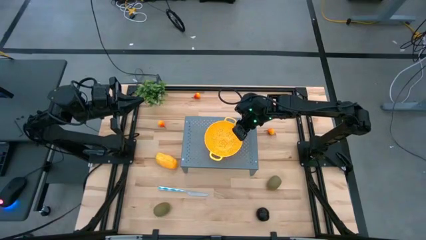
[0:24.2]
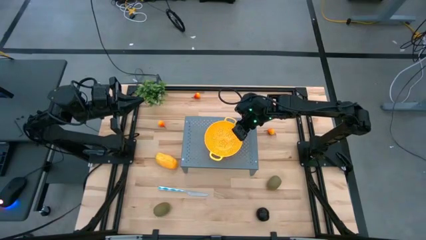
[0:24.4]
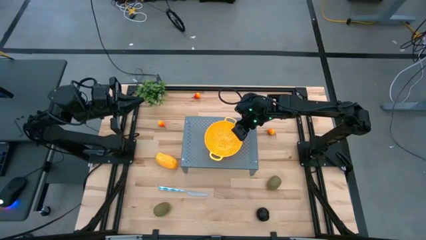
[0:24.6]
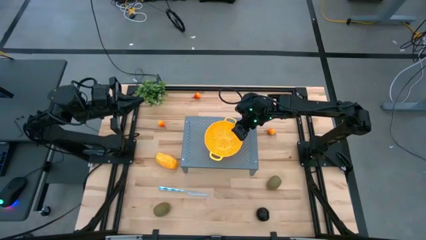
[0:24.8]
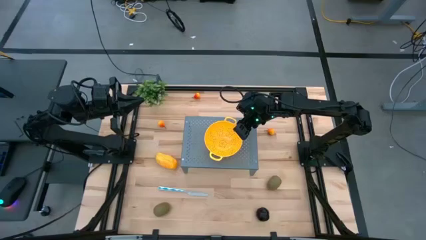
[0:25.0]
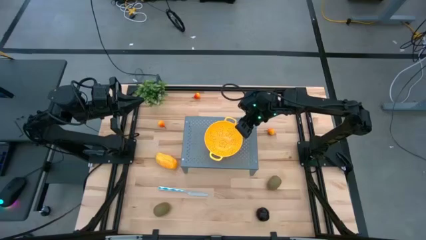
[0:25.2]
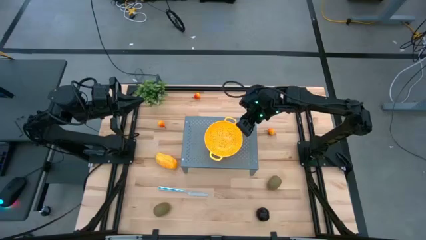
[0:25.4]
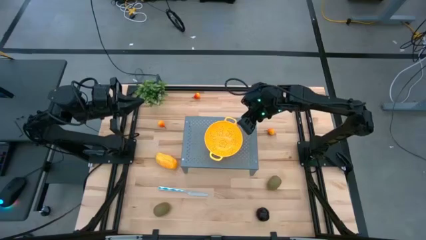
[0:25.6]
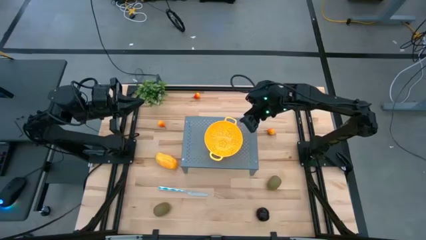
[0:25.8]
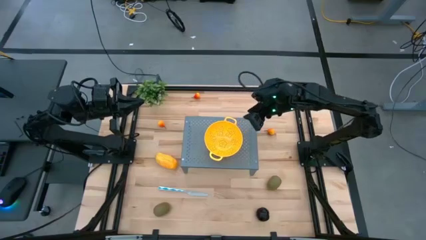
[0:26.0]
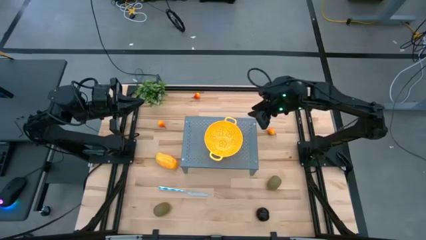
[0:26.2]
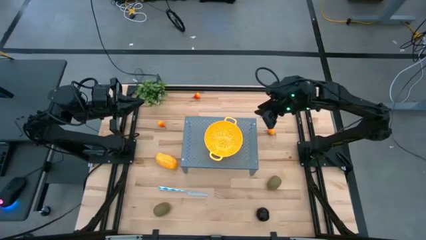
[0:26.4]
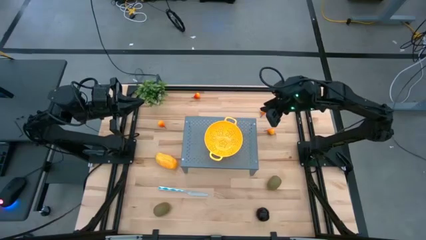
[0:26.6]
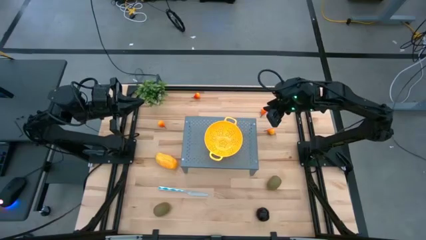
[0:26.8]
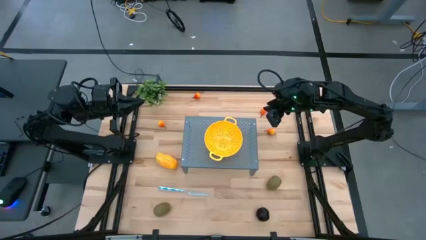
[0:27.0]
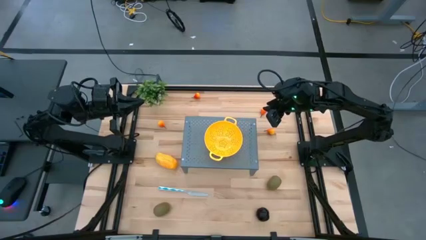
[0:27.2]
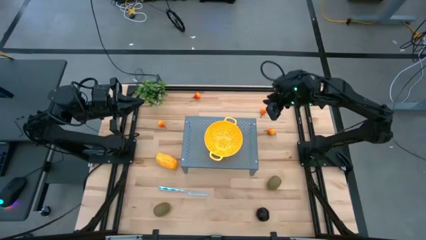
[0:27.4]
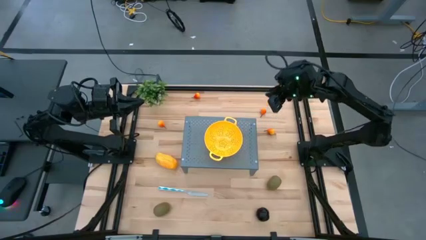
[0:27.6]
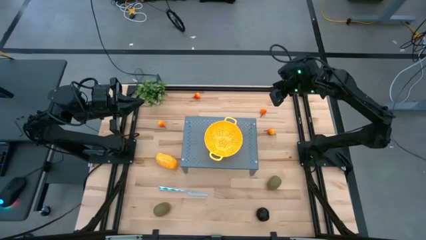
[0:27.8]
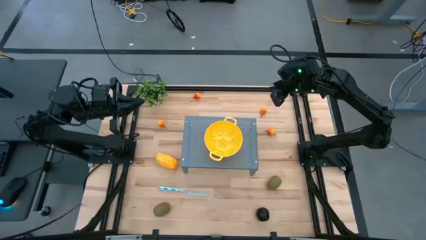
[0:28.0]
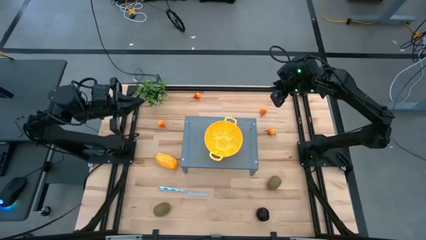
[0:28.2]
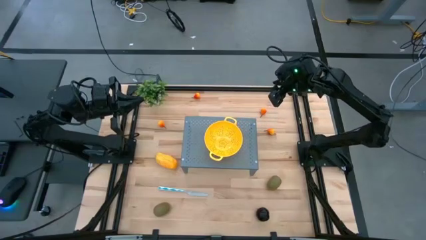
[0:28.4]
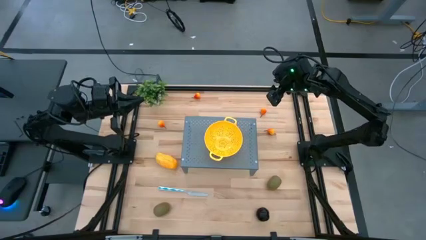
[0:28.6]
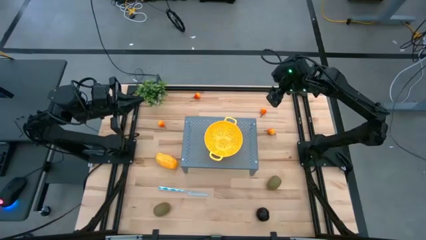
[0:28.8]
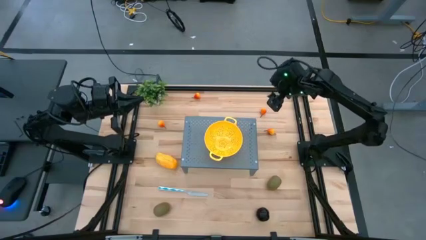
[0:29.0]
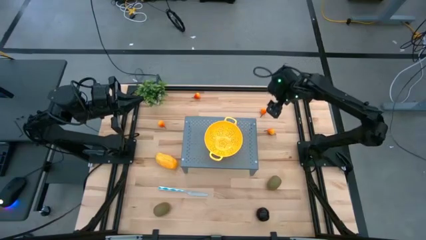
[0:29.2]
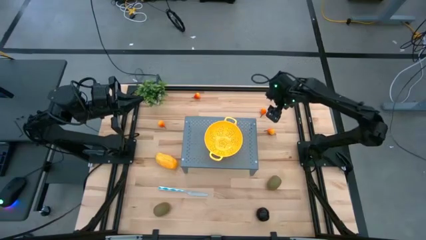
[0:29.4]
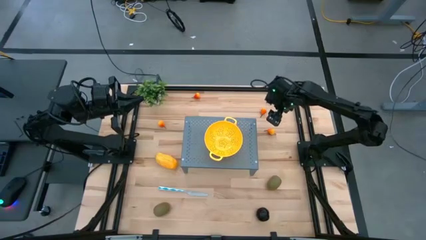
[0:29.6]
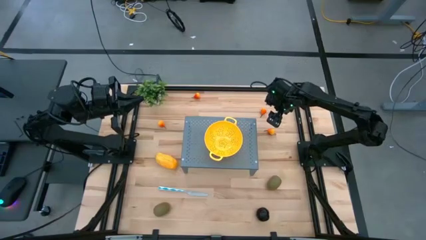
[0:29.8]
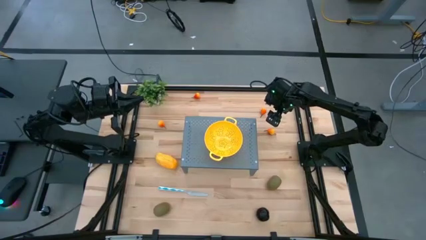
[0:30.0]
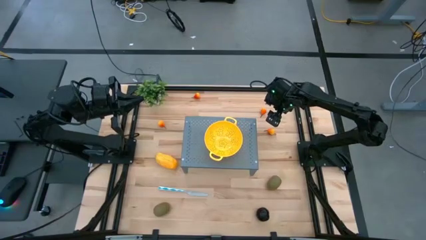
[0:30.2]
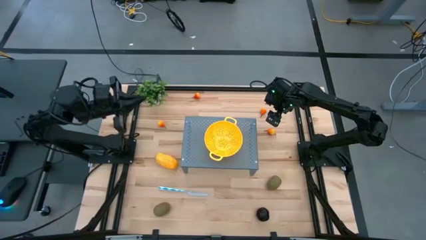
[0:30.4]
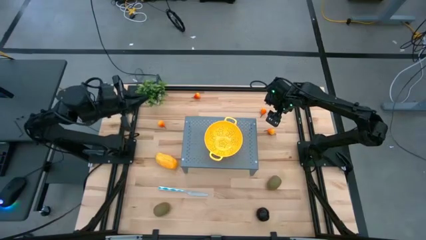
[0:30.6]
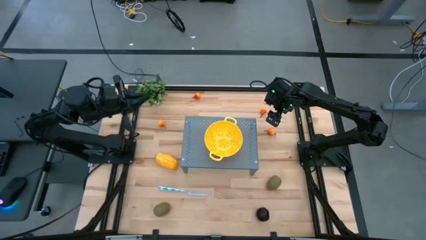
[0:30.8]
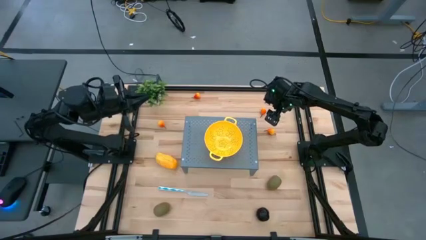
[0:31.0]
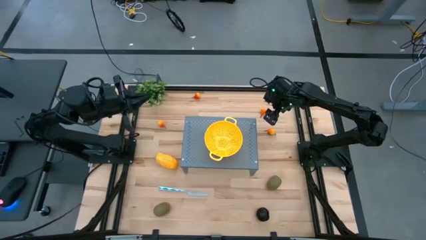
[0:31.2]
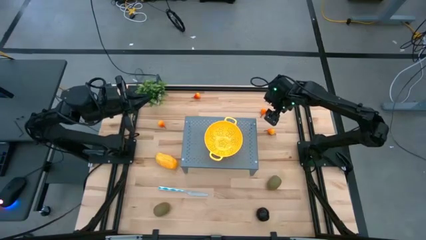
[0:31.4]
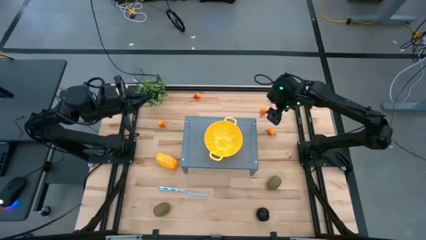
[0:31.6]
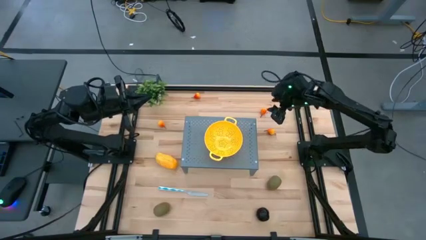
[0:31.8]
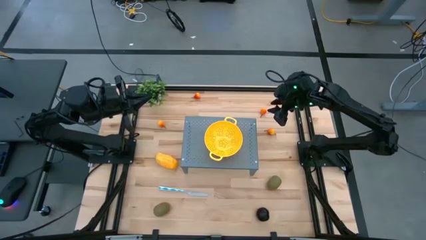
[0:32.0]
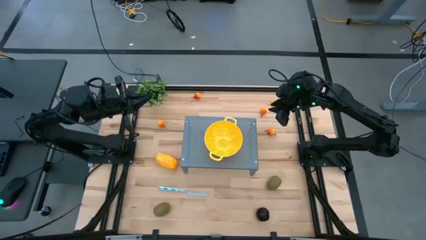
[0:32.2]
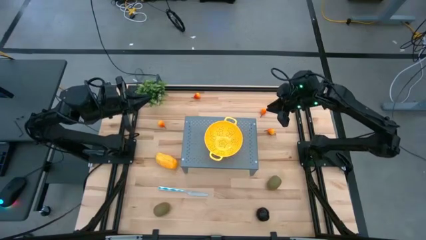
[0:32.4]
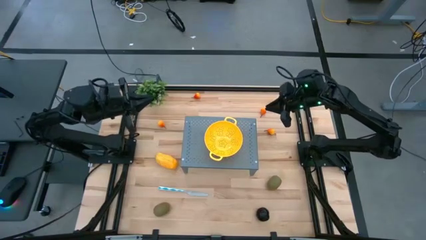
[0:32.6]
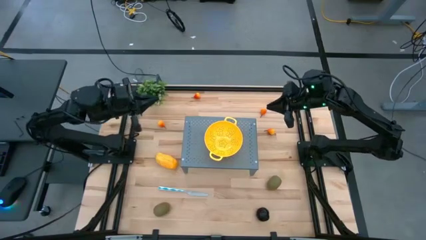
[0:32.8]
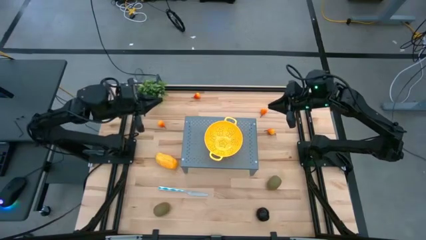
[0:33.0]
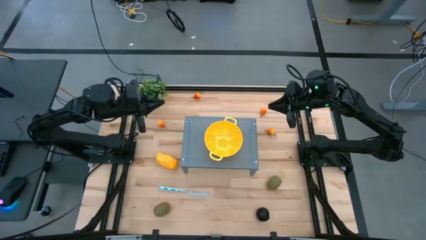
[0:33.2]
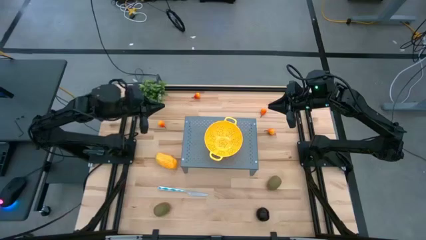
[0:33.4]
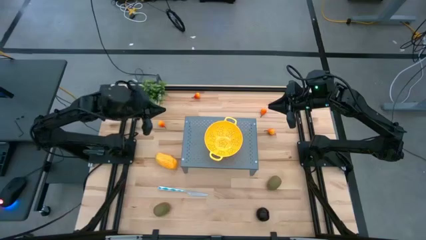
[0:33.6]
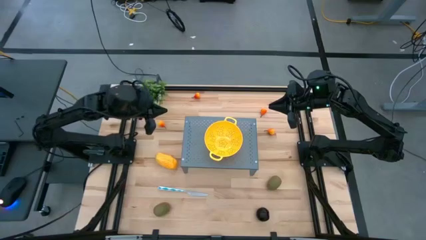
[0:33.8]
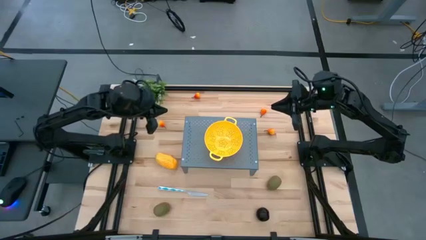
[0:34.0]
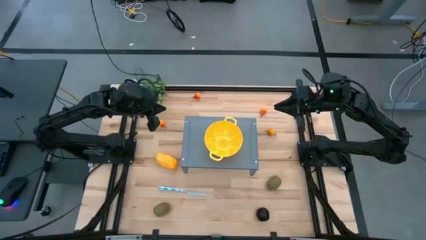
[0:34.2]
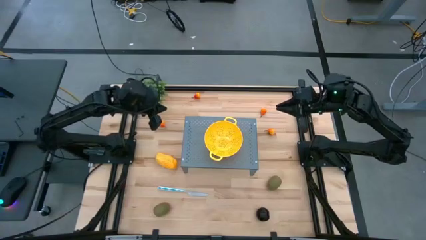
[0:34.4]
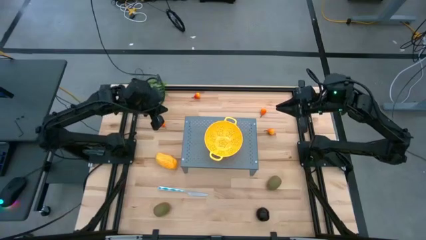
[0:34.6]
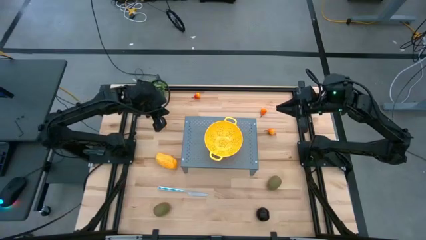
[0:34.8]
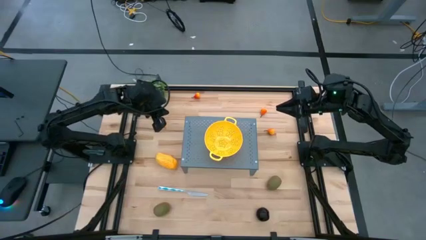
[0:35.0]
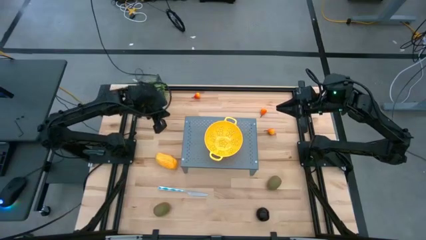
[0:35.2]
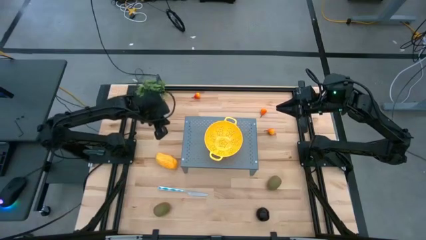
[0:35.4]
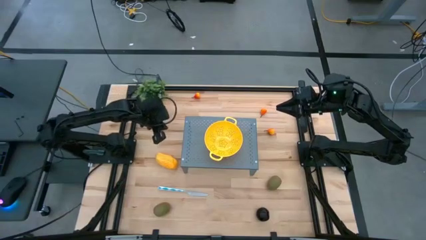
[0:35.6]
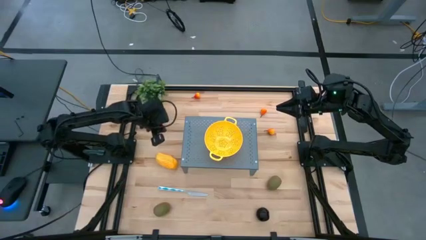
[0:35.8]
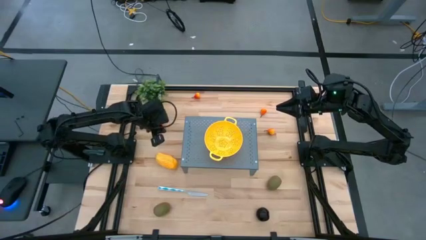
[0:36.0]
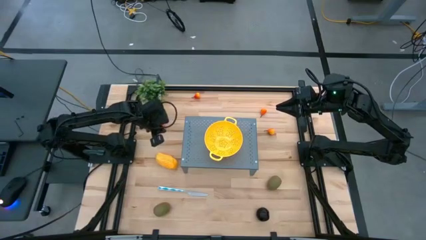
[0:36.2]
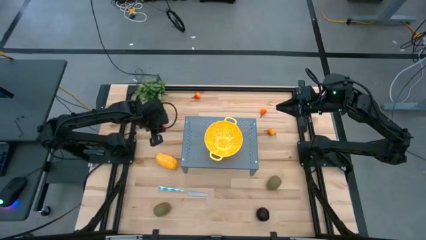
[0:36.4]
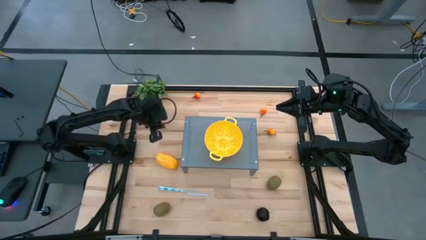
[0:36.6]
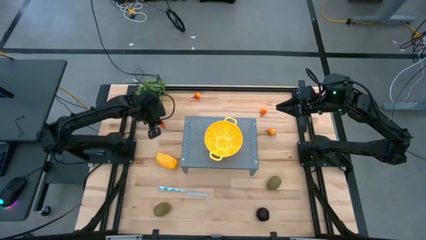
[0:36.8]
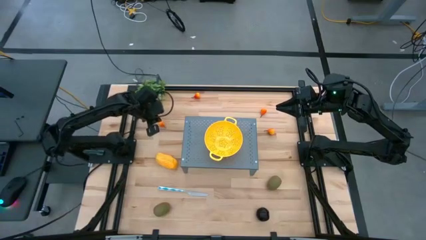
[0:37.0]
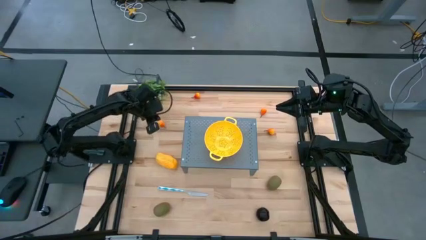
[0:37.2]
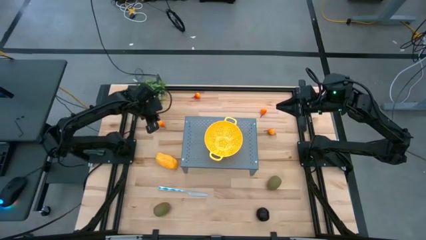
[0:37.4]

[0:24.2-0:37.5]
Task: Pick & Place Fruit
Put the pear into the strainer bowl on the shelf

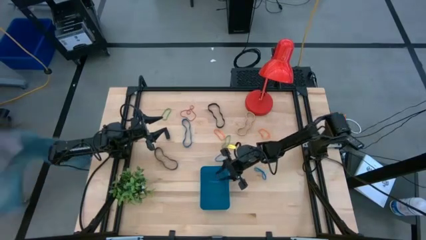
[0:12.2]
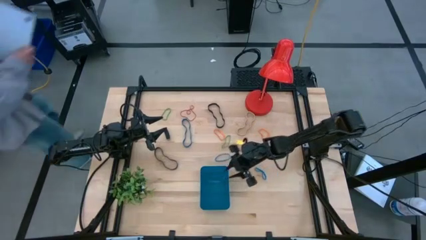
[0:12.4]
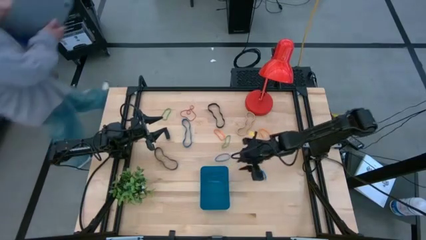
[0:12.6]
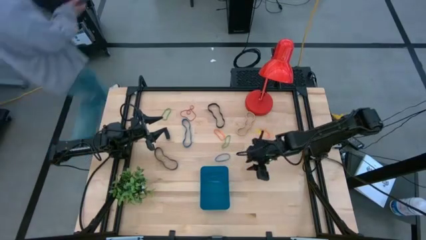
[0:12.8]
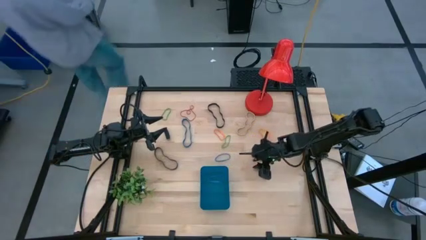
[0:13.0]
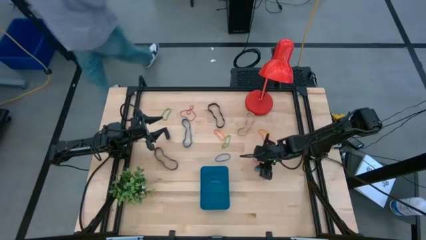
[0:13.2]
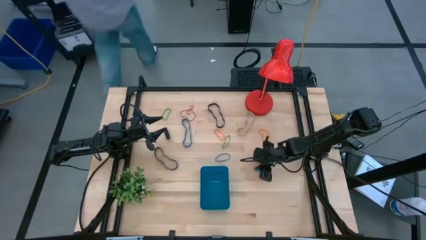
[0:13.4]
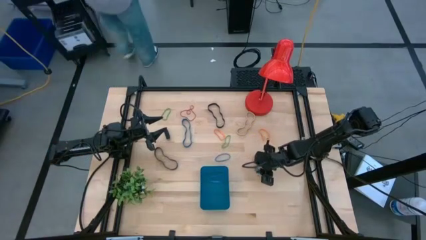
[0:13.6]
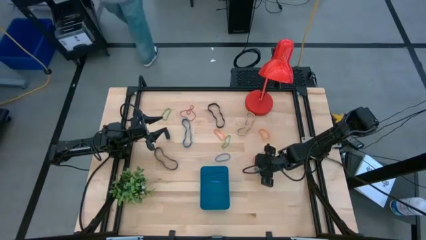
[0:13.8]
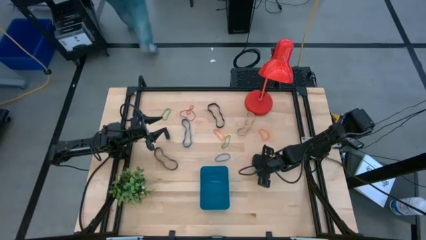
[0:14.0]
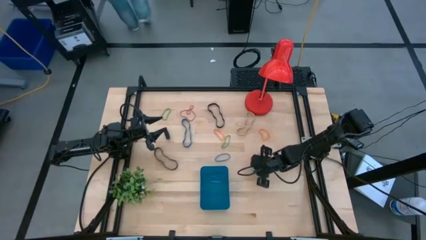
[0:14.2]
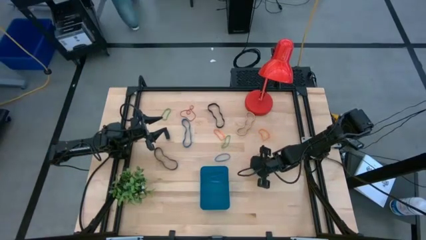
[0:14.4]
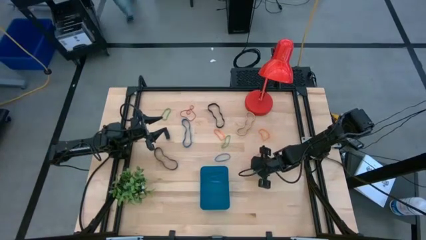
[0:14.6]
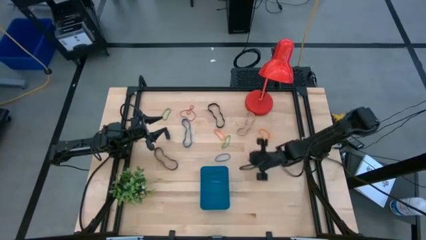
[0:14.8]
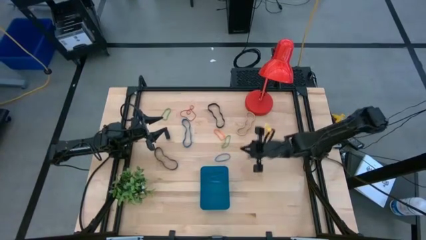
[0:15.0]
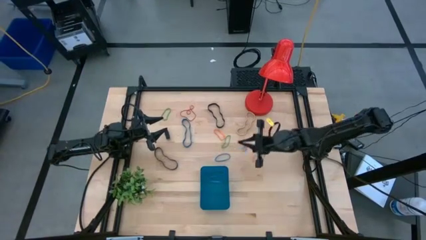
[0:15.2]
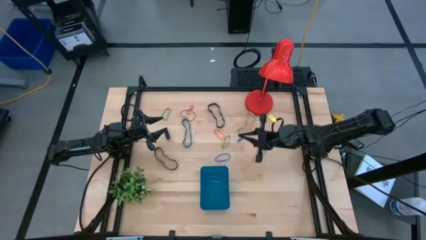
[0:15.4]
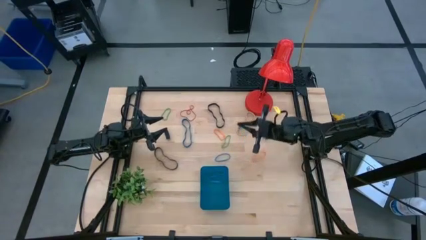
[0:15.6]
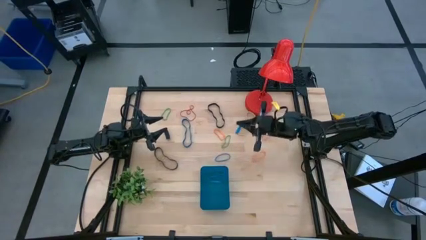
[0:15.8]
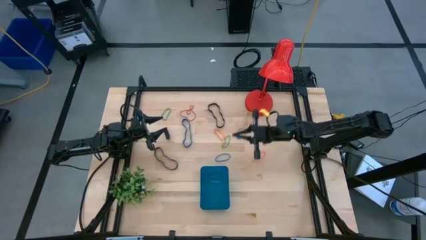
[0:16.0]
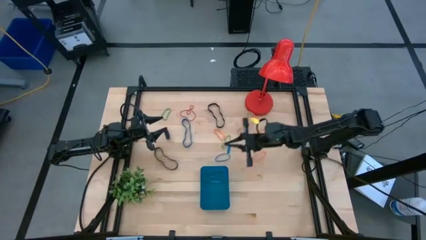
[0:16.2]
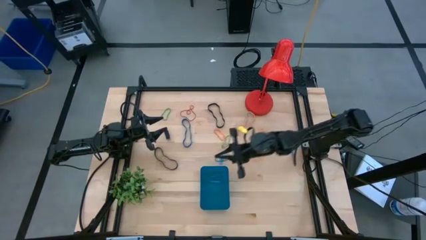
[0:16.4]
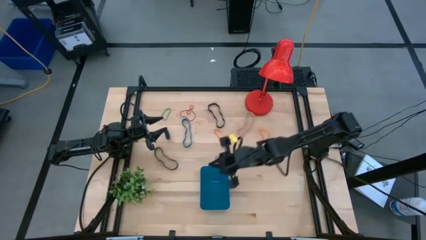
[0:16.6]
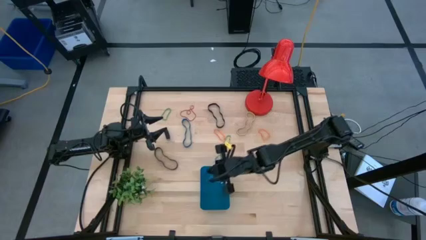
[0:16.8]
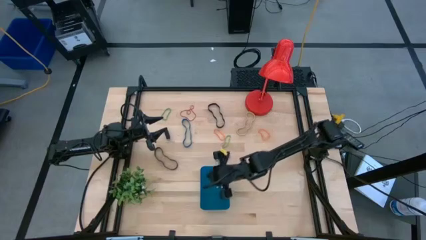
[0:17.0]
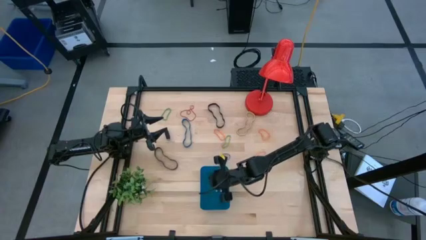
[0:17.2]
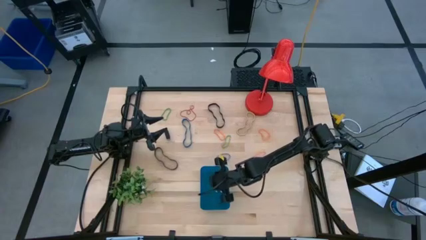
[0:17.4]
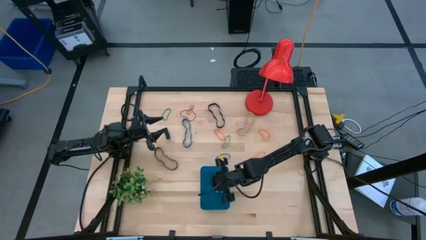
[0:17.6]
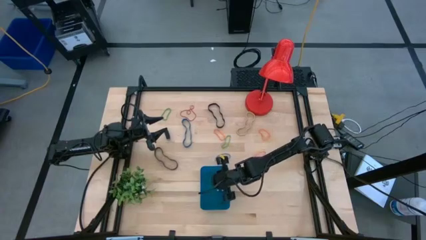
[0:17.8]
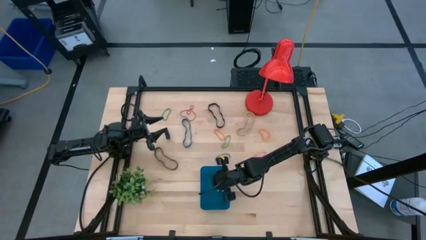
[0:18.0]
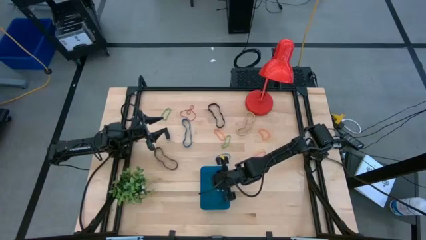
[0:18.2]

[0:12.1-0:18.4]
Task: Pick and place rubber bands into bin
Put the bottom light blue rubber band into the blue bin
